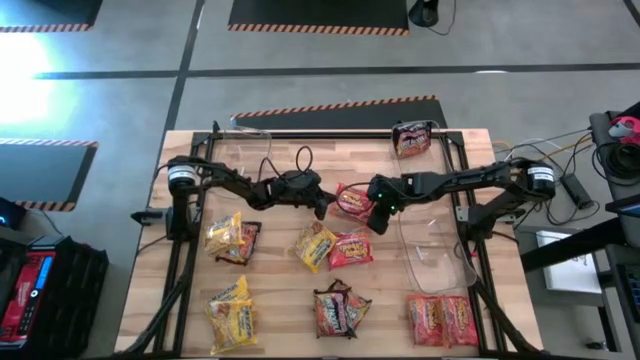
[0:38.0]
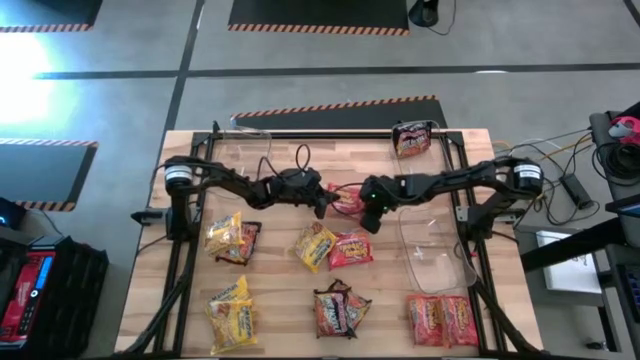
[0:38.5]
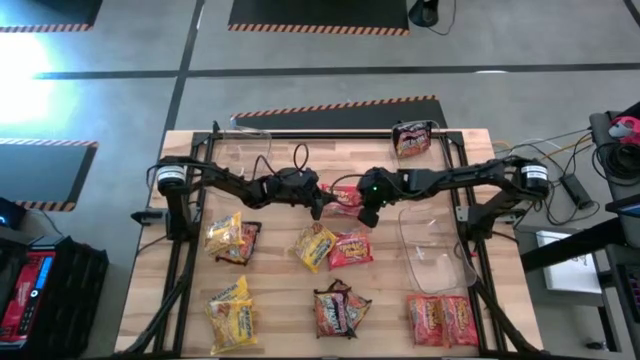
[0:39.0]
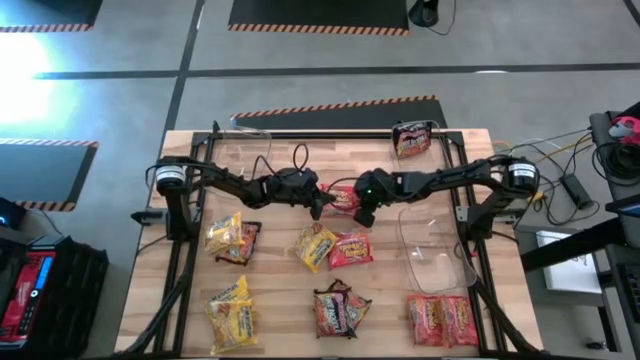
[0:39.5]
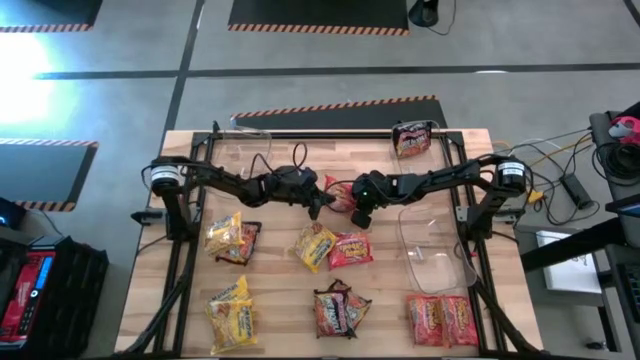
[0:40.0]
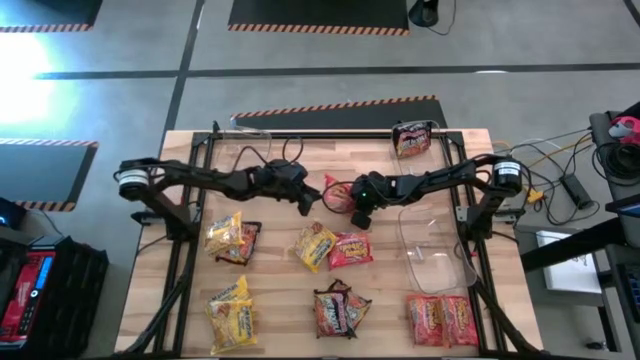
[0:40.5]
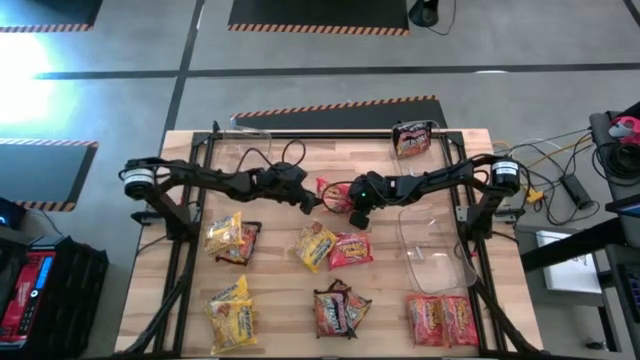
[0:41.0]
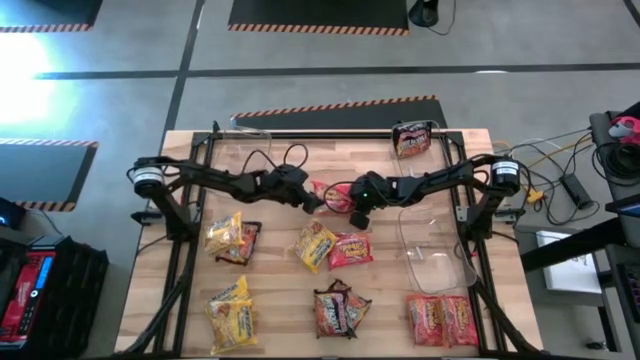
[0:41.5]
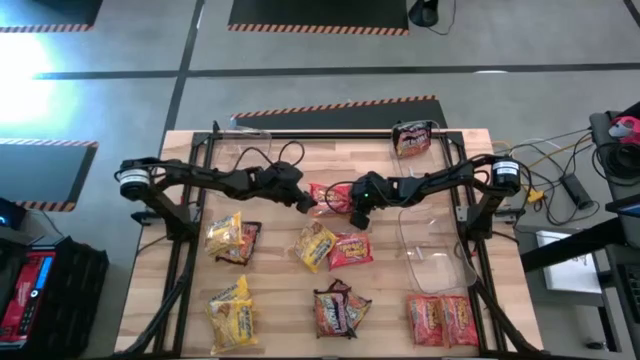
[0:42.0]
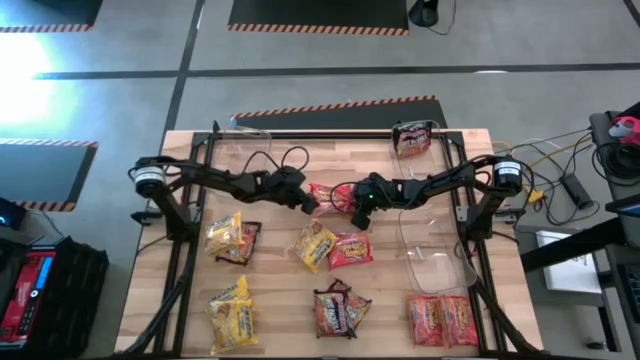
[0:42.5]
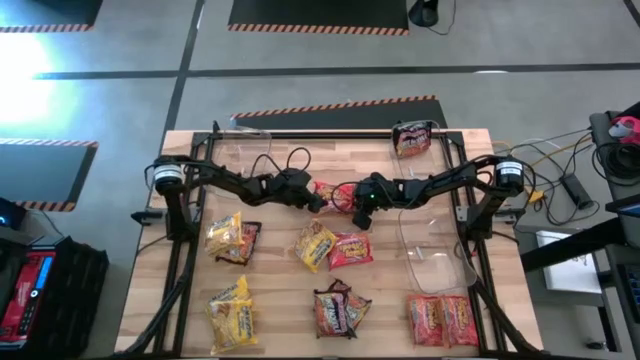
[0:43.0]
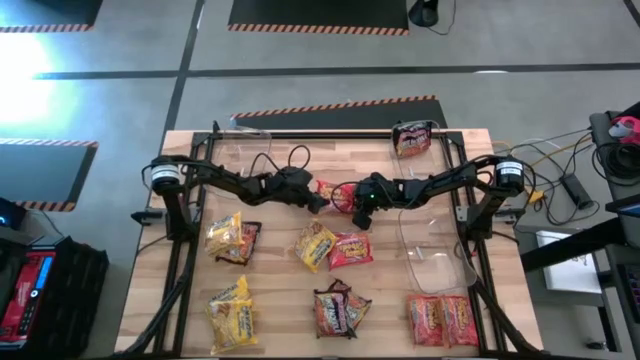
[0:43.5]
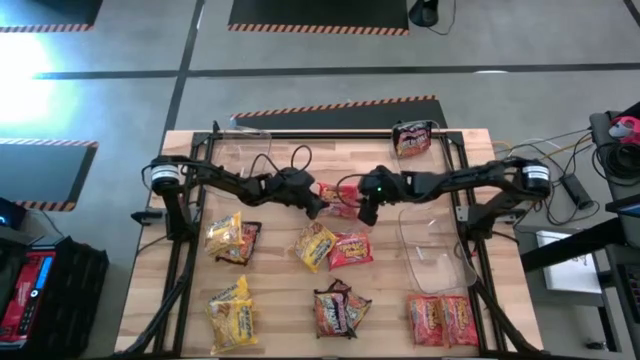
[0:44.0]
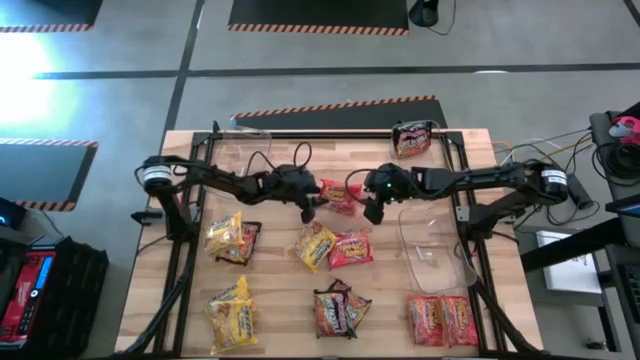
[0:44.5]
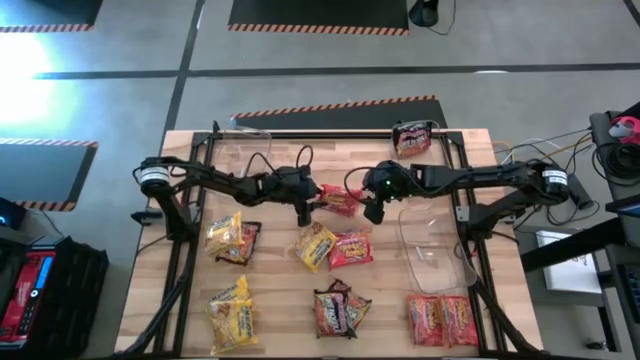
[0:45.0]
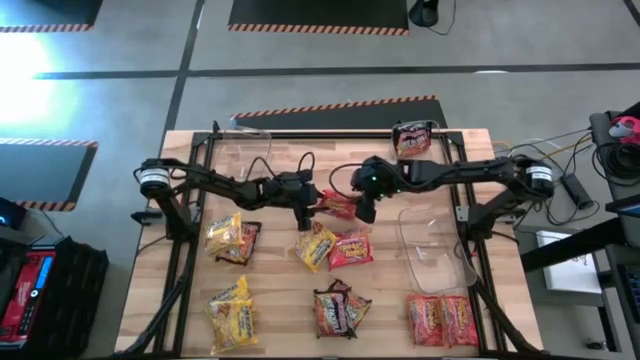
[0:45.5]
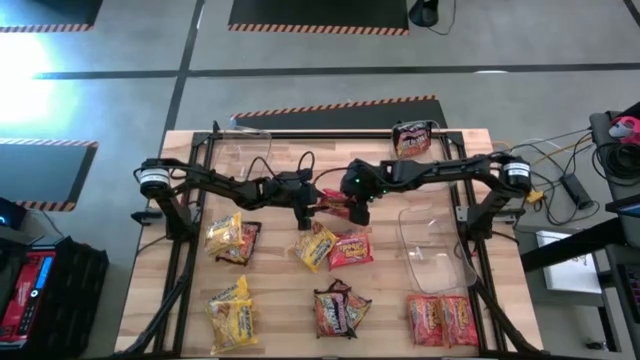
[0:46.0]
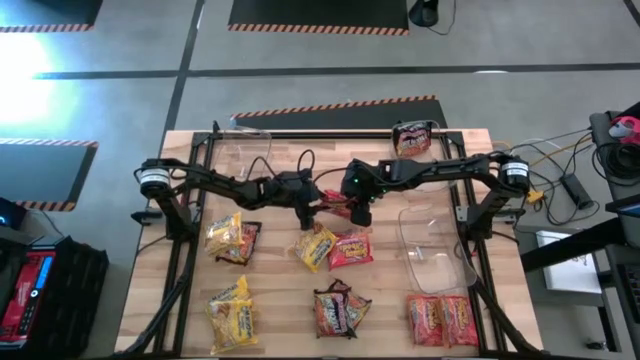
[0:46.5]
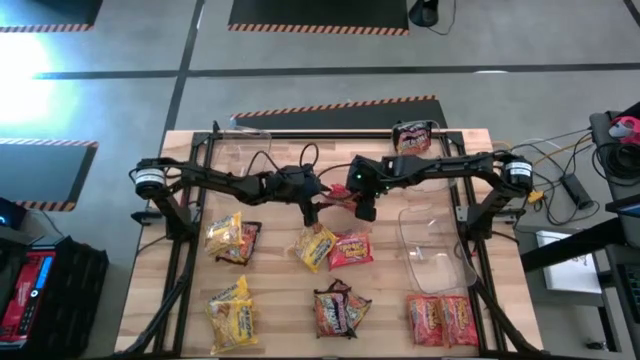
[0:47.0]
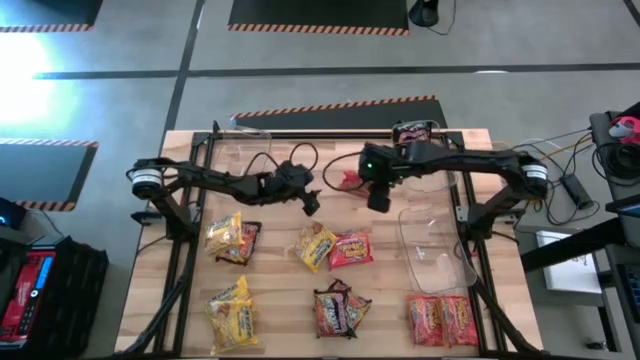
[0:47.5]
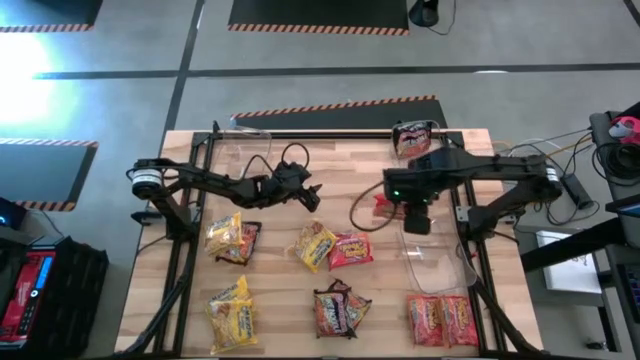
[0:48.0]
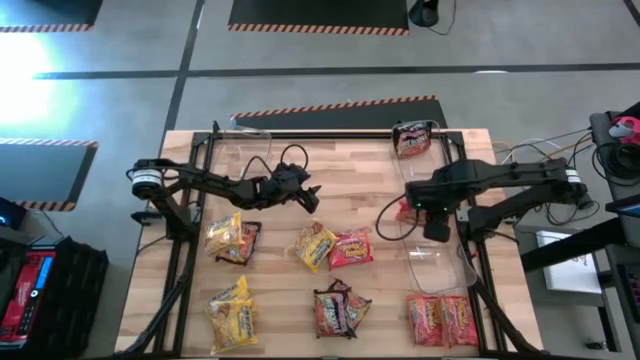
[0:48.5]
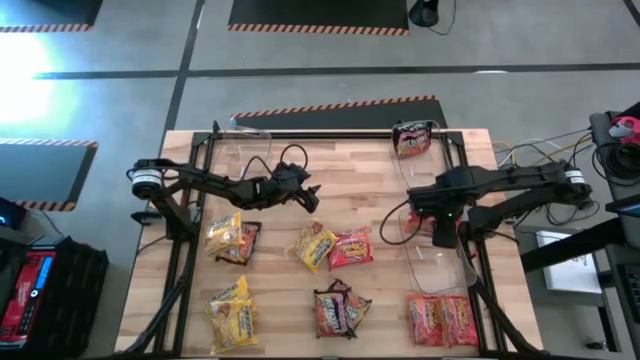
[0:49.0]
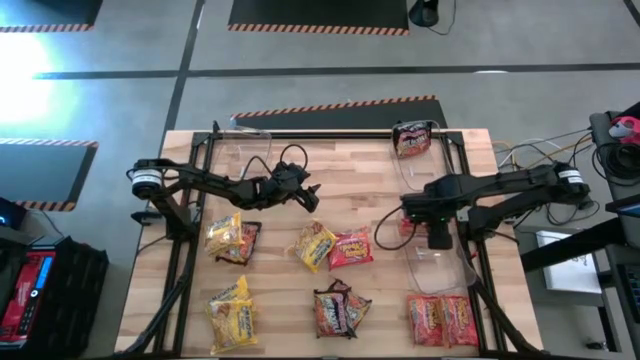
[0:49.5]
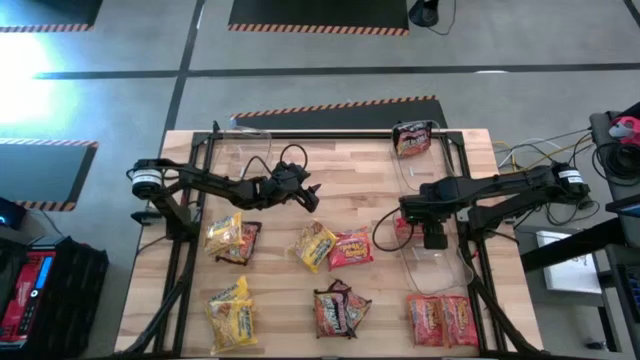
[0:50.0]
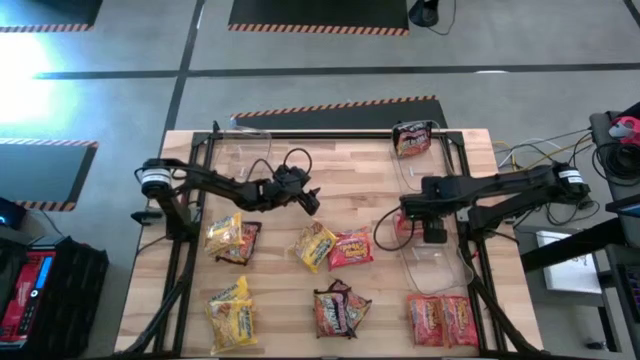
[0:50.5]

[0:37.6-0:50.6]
Task: Sort Maruchan noodles
Put the orange noodle pack into the bottom transparent bin

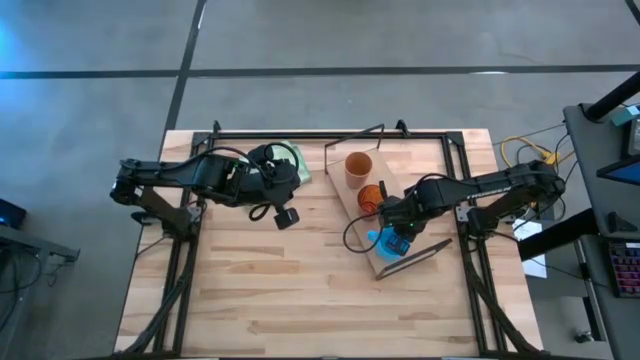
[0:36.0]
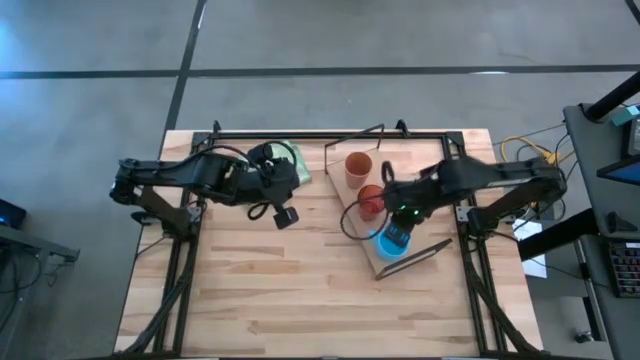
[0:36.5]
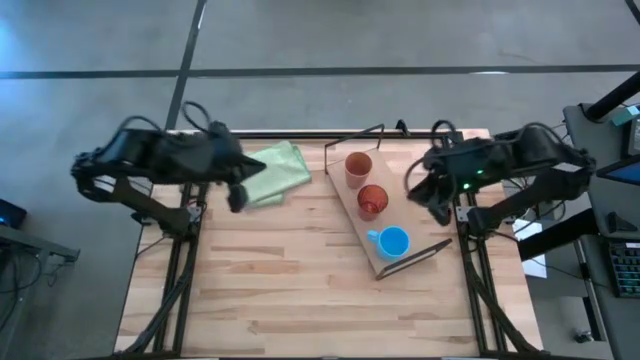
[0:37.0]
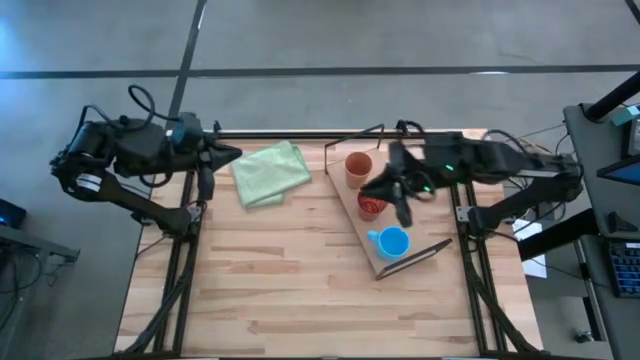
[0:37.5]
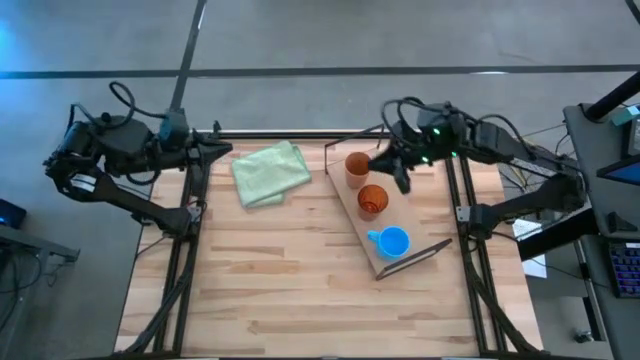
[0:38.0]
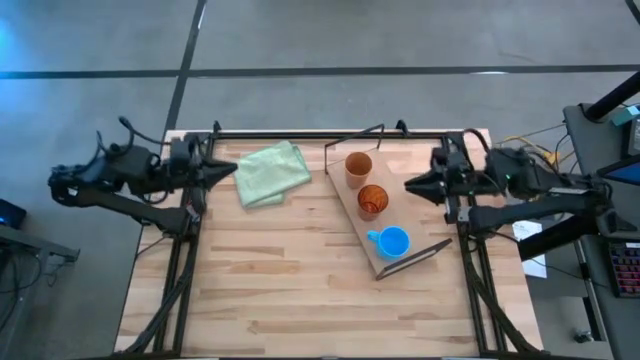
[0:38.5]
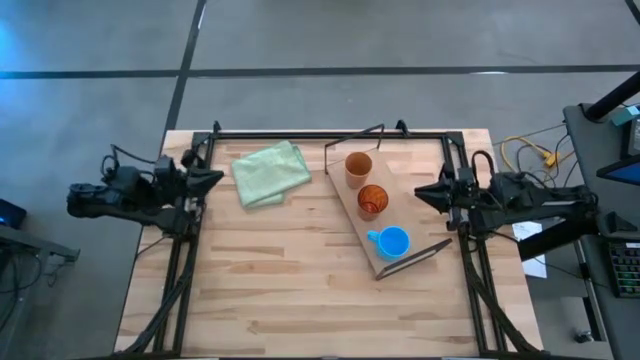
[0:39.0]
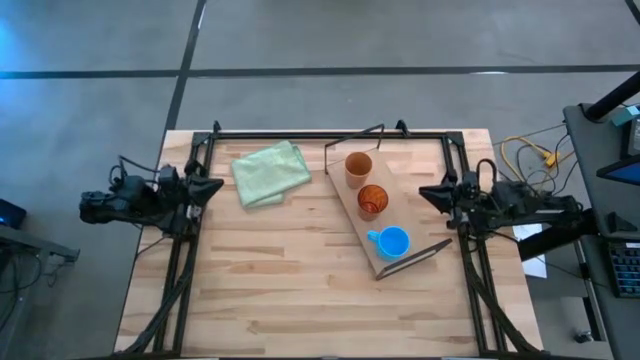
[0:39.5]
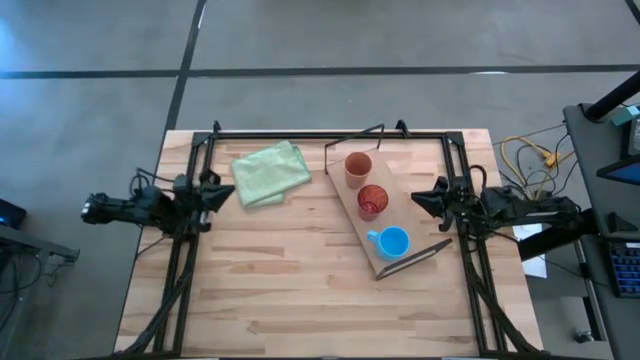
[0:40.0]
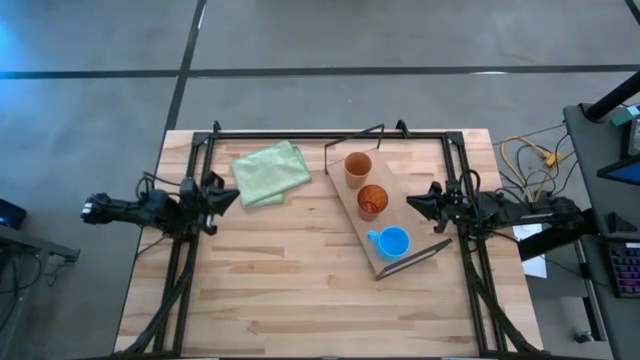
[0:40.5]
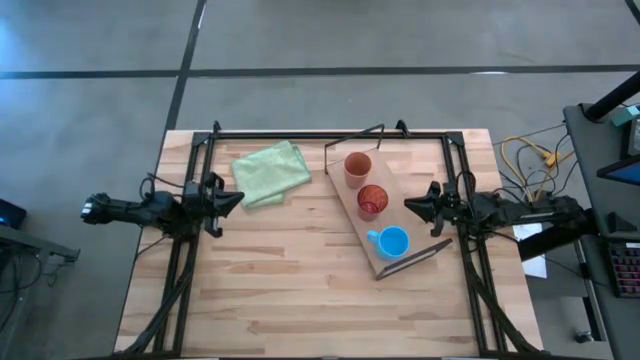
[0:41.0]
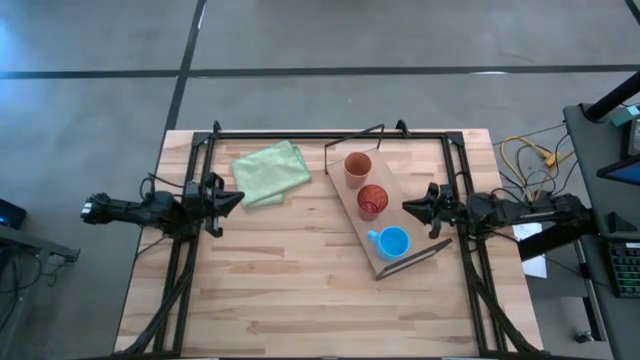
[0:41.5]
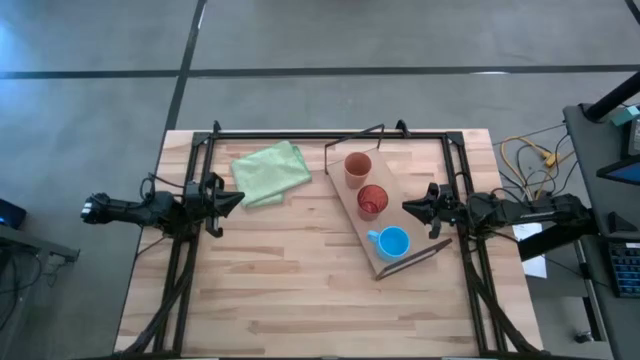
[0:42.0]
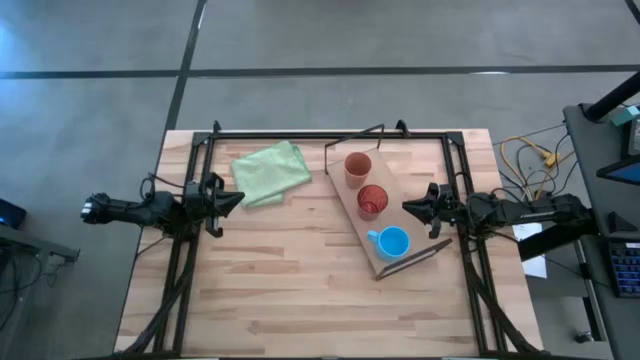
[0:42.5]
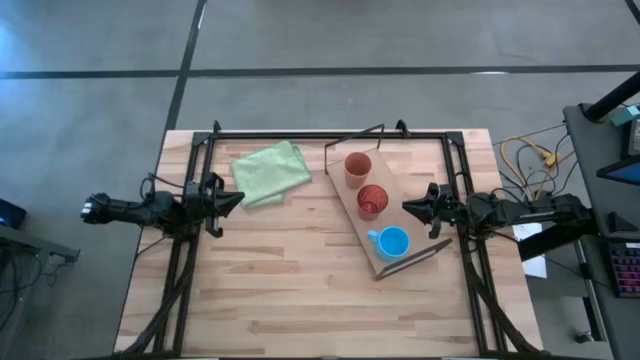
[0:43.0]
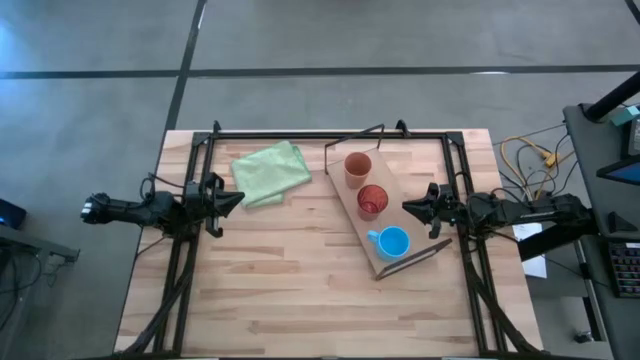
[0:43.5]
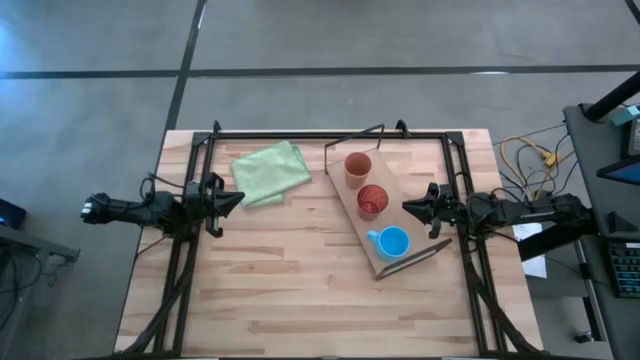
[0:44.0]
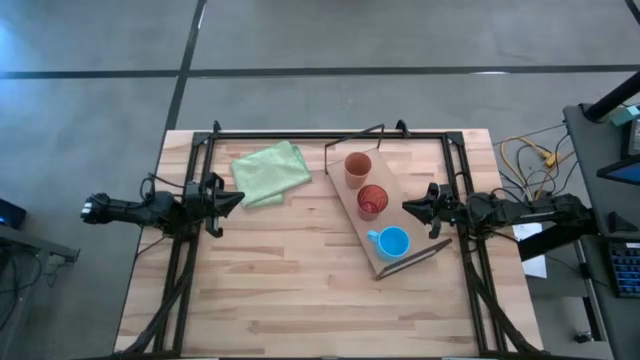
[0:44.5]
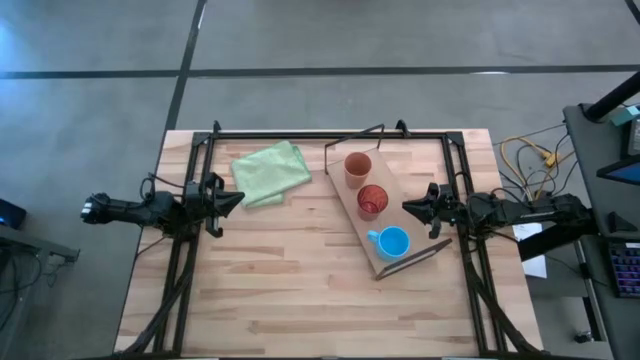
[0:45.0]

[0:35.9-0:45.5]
Task: Stack small to large cups/mugs on shelf
Return to Home Position
